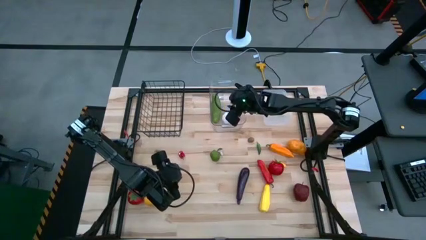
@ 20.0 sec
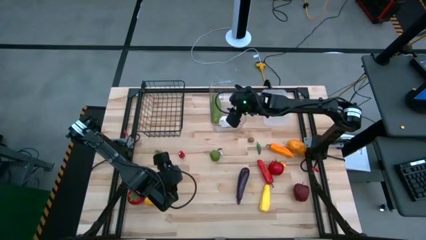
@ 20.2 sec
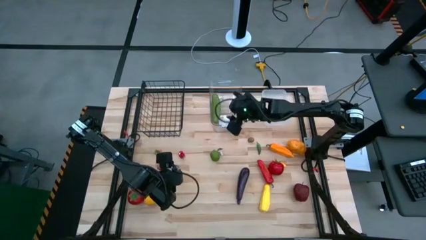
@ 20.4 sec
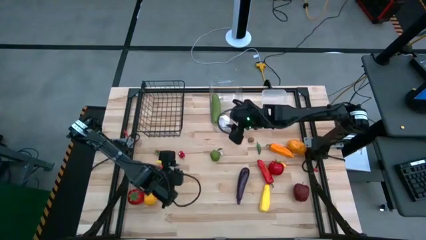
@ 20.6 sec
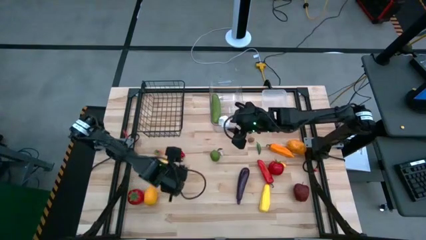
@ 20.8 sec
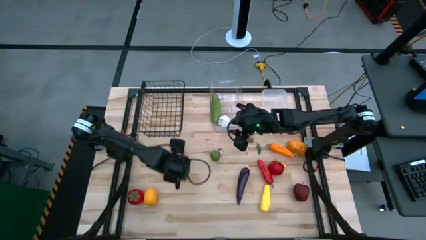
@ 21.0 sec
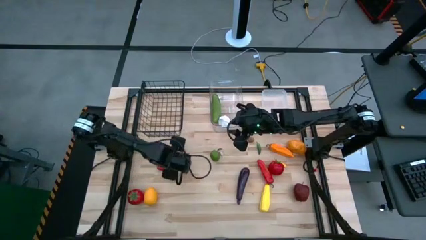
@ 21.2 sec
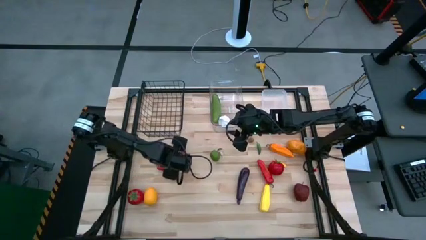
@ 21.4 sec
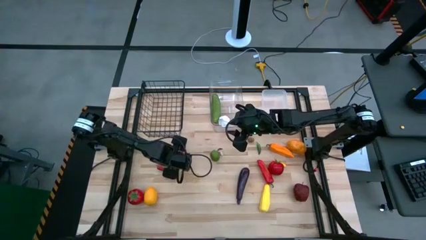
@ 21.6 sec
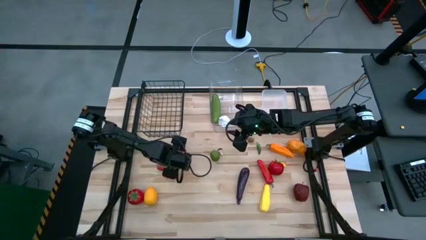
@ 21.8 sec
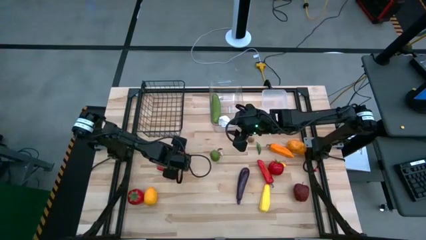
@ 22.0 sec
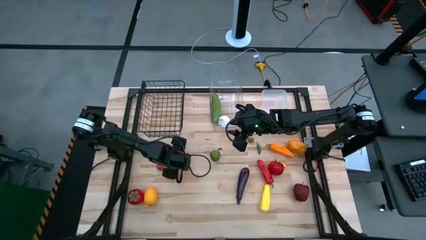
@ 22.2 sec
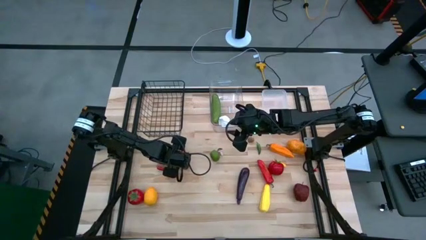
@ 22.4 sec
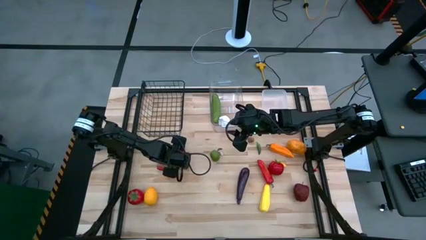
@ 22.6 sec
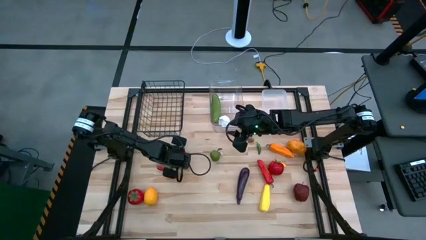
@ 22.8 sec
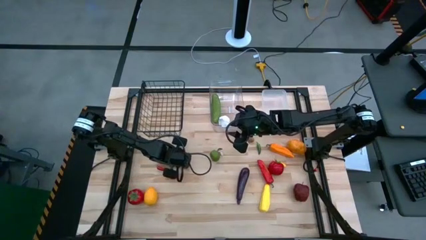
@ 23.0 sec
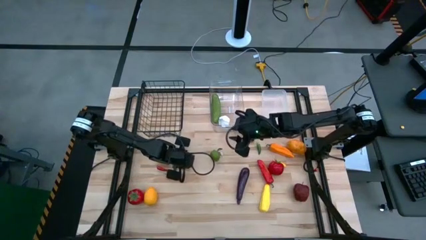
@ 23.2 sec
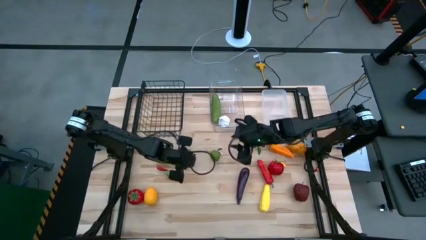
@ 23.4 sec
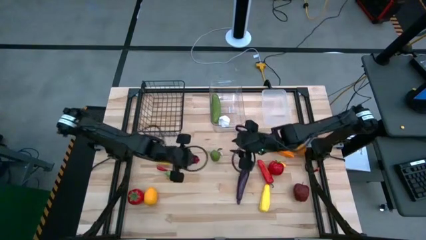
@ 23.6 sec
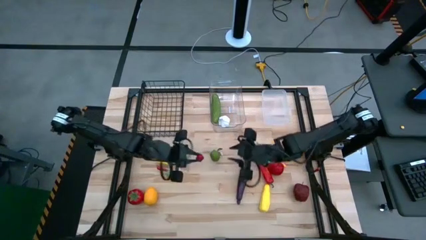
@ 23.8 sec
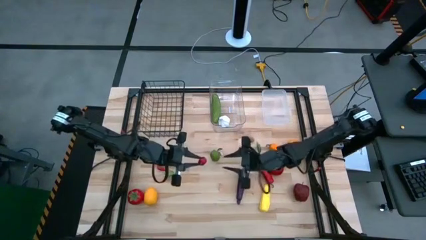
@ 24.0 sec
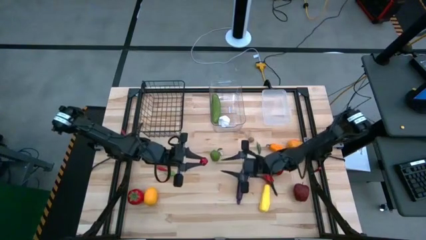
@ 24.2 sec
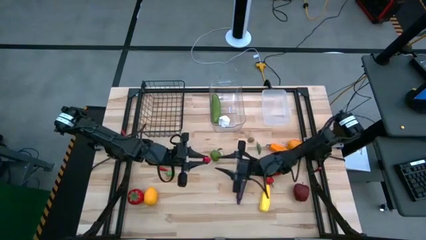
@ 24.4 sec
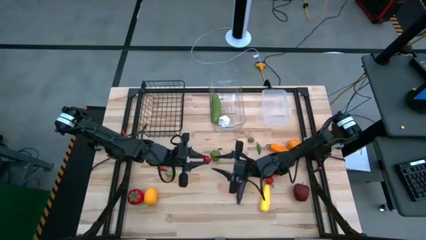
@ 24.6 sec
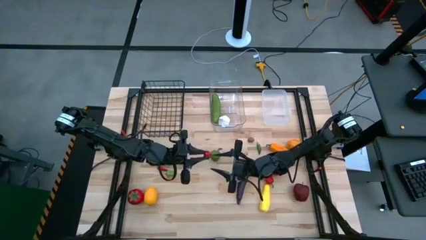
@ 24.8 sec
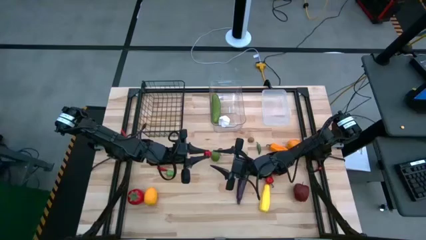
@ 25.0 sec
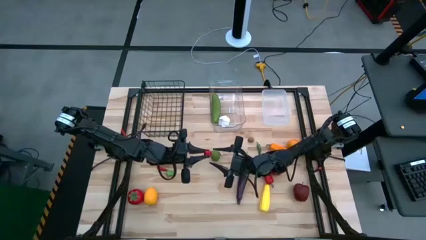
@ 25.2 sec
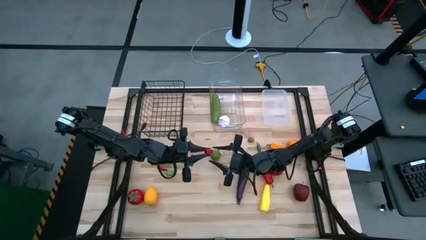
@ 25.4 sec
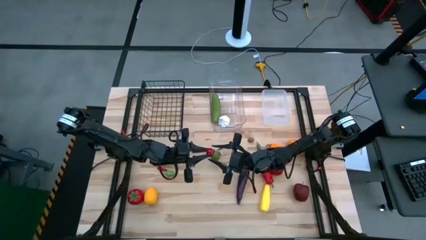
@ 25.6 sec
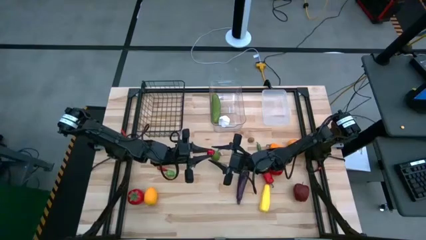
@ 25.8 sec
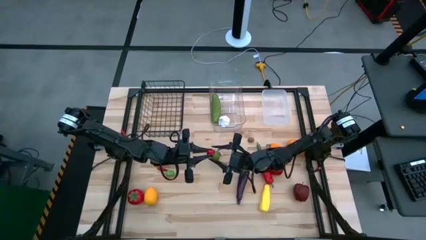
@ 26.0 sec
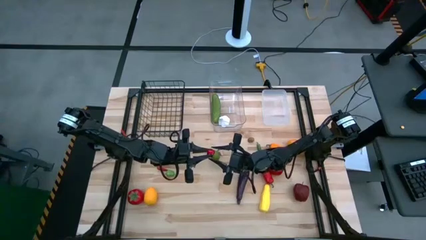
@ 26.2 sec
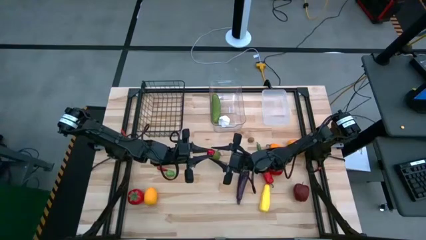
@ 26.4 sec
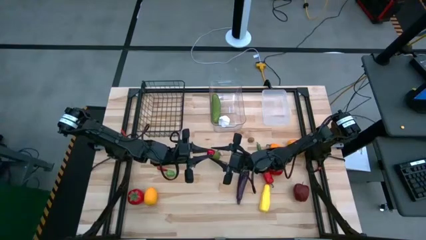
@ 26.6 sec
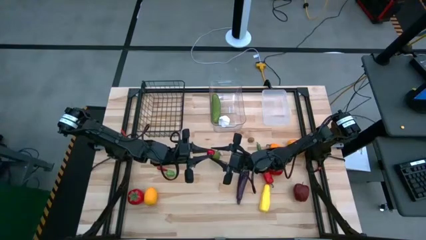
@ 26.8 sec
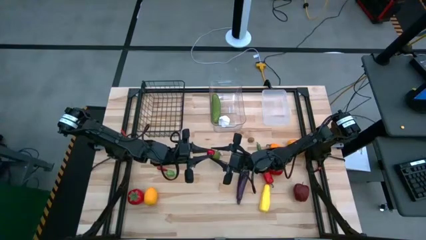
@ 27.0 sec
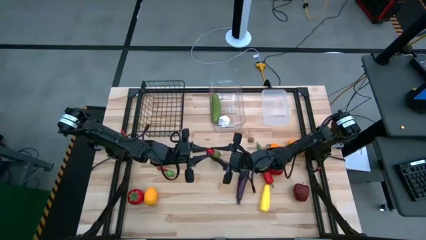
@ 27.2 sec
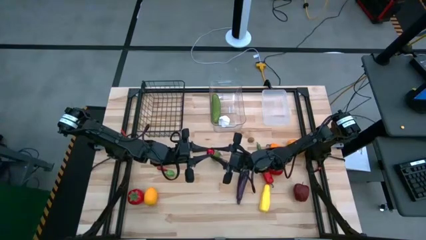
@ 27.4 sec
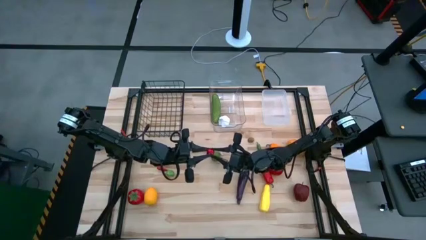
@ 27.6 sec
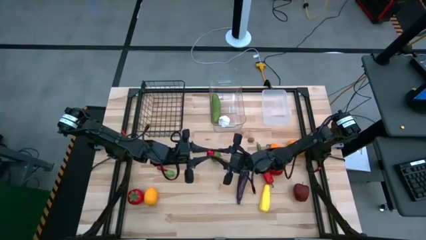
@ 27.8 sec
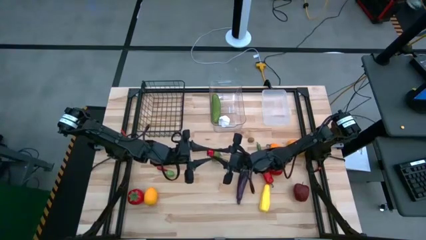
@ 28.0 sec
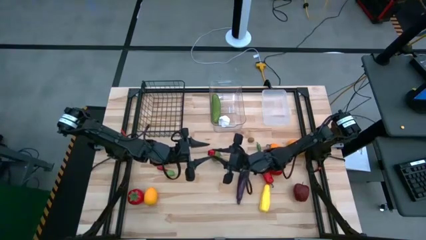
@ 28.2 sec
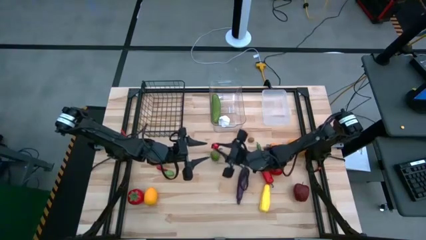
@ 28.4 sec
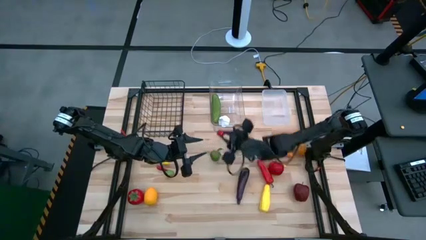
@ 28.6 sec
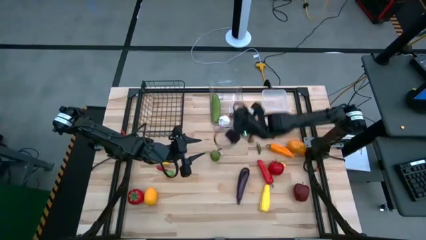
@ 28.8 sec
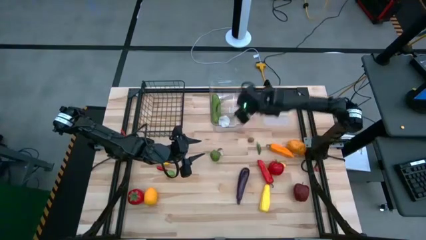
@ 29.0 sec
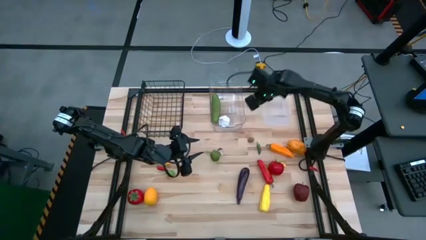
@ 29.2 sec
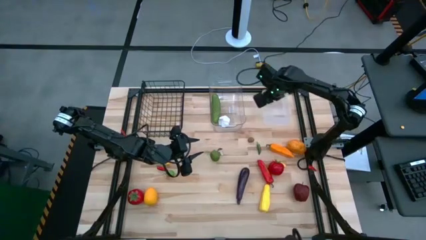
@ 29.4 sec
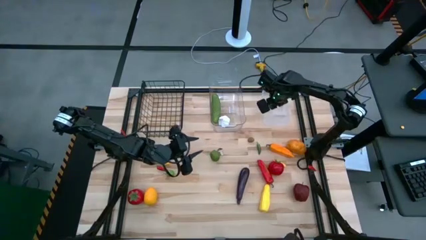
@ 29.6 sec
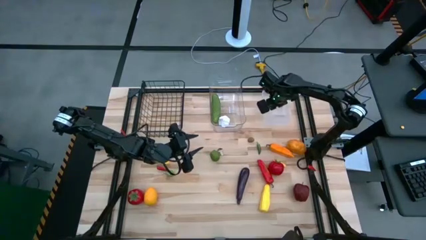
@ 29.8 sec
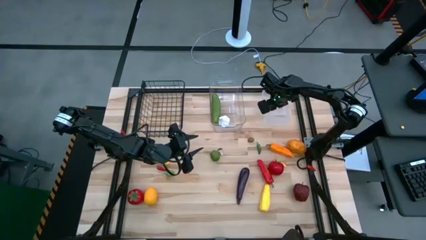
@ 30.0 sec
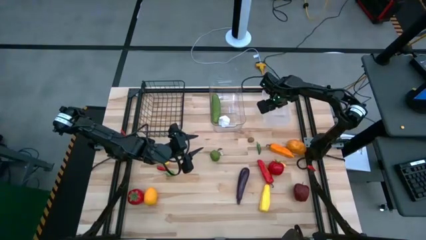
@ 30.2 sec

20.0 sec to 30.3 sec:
Task: Sort produce into baskets
Put the red chili pepper into the right transparent bin

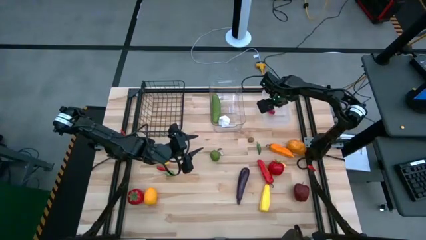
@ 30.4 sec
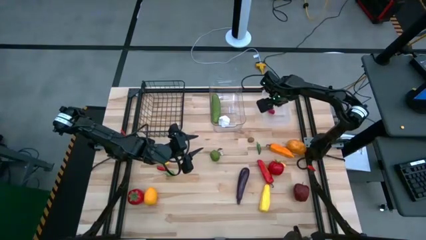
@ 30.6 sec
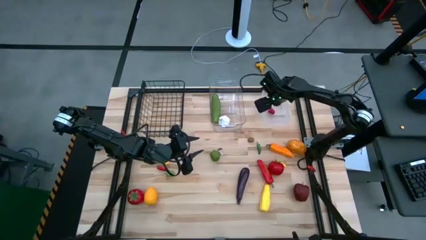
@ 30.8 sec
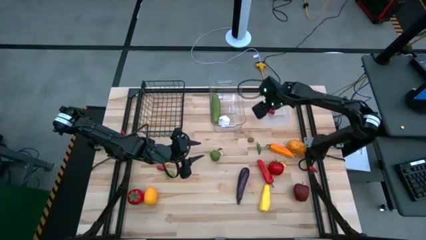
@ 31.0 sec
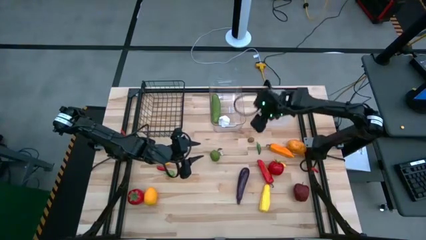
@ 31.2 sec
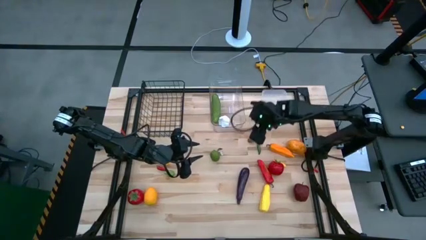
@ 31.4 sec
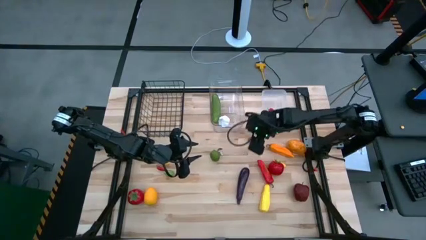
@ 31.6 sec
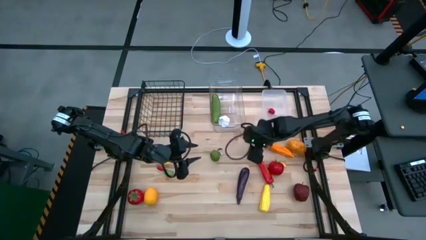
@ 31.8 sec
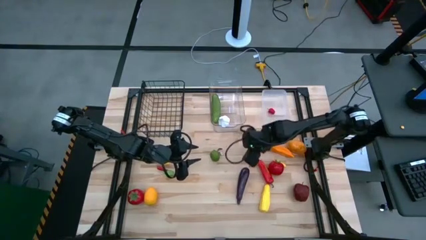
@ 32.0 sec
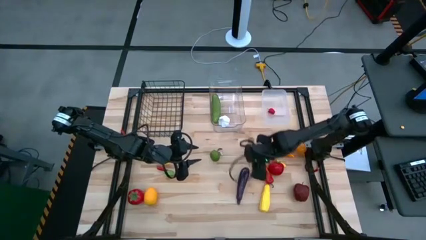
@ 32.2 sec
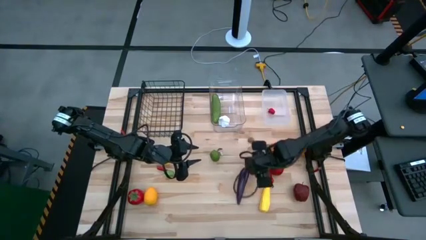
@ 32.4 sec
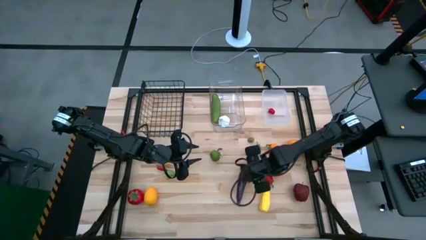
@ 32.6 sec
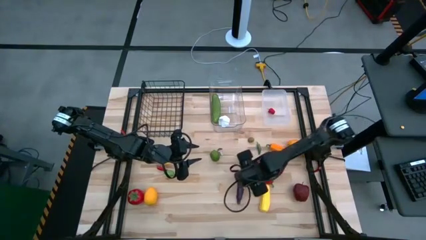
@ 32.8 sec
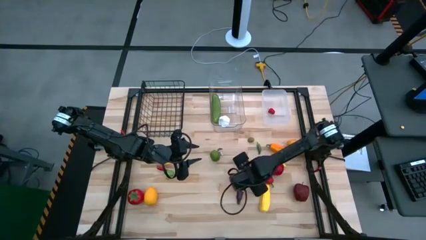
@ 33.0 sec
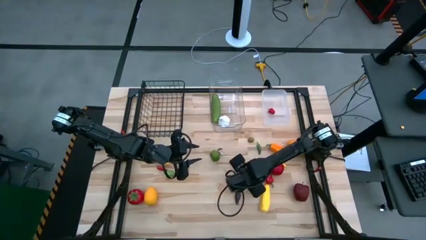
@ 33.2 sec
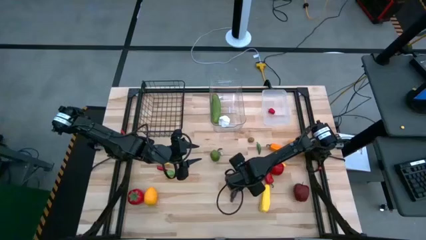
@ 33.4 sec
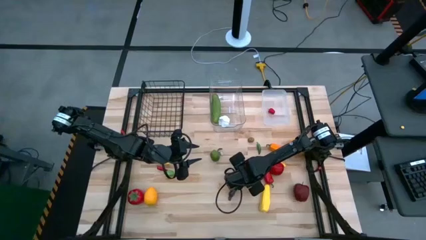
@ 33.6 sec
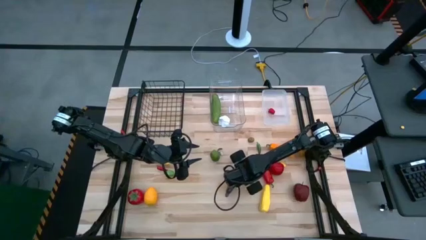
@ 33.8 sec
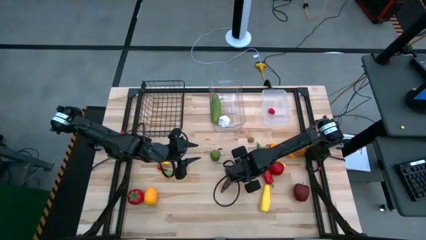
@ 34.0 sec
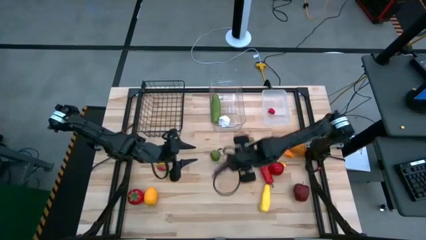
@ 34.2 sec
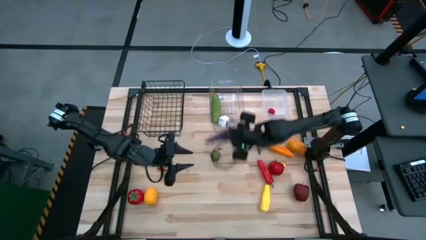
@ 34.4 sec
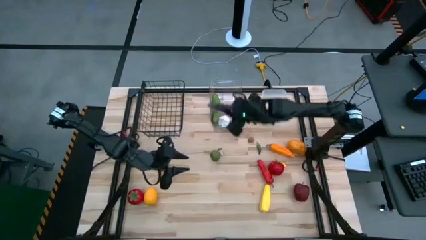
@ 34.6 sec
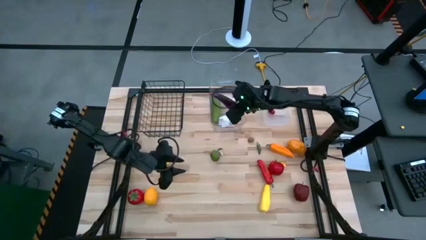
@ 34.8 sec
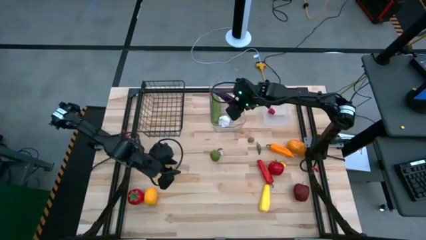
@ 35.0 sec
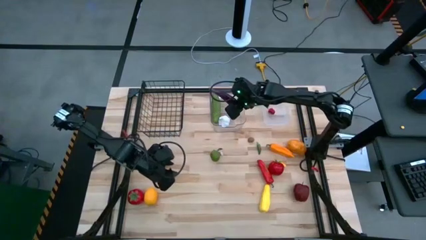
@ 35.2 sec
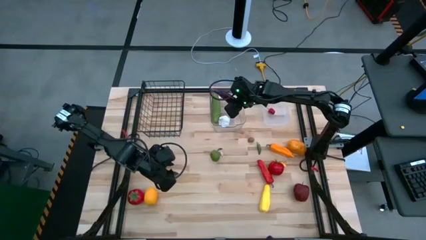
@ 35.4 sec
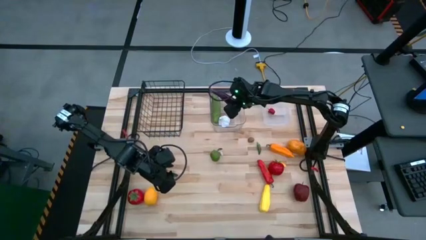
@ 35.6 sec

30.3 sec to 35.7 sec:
Put the purple eggplant into the left transparent bin
